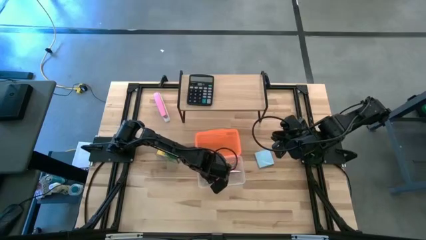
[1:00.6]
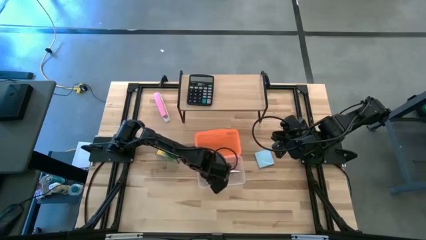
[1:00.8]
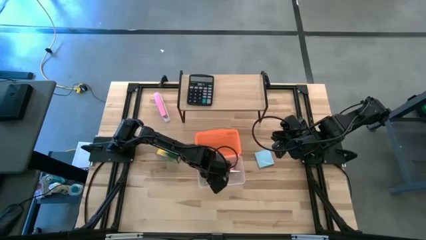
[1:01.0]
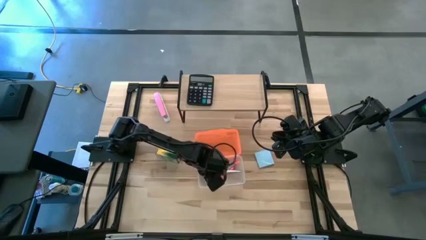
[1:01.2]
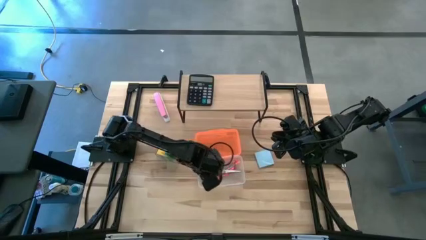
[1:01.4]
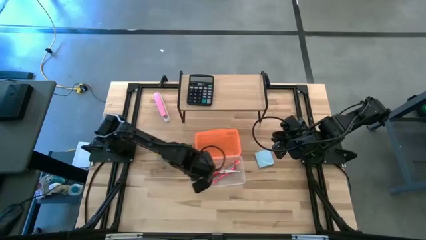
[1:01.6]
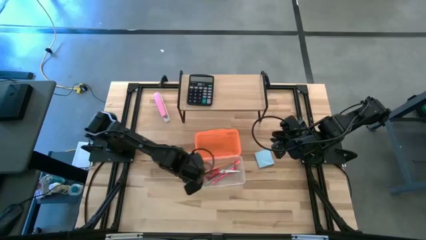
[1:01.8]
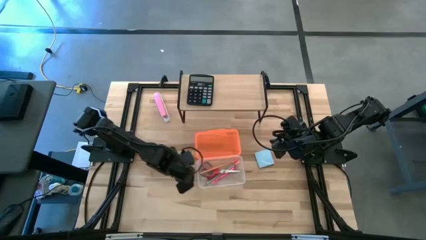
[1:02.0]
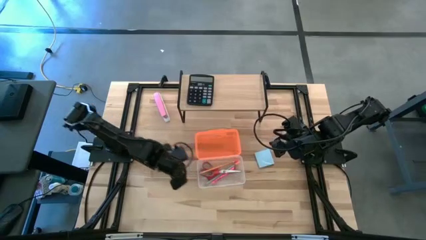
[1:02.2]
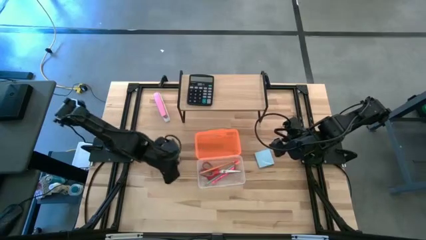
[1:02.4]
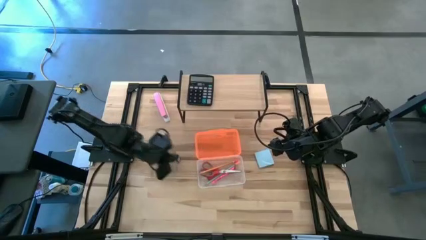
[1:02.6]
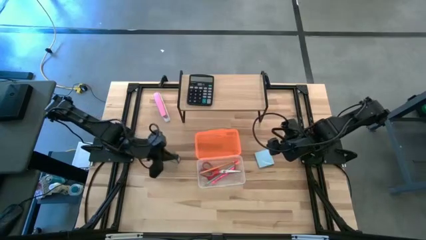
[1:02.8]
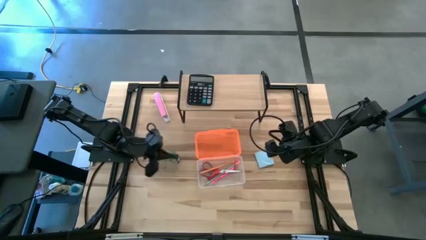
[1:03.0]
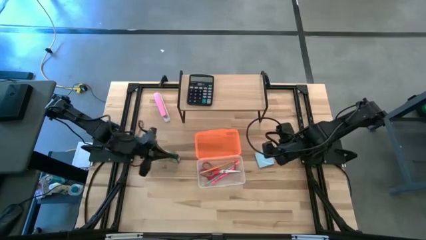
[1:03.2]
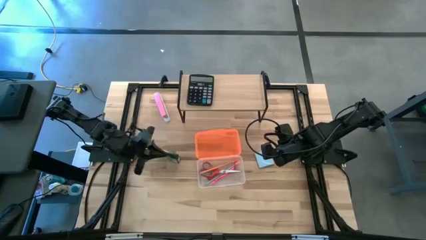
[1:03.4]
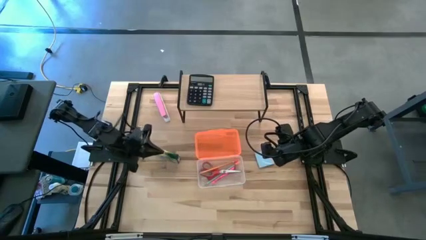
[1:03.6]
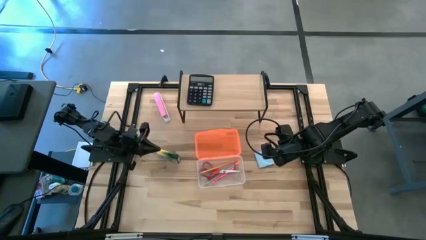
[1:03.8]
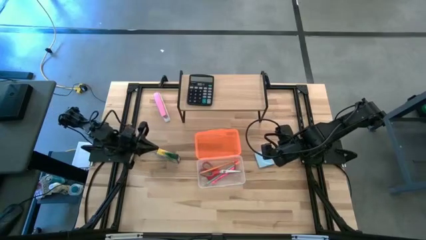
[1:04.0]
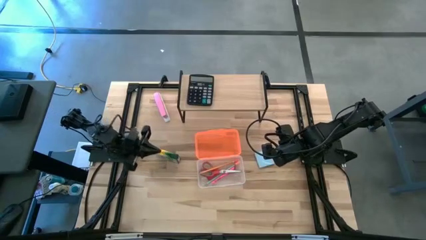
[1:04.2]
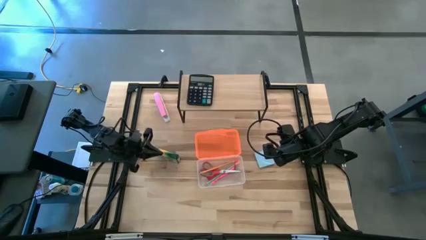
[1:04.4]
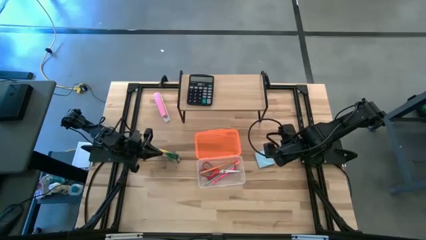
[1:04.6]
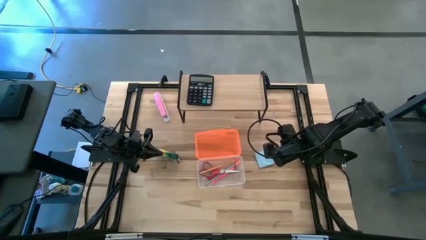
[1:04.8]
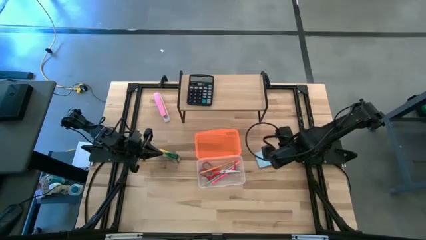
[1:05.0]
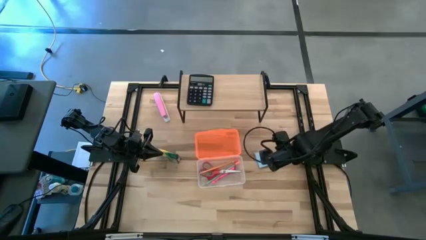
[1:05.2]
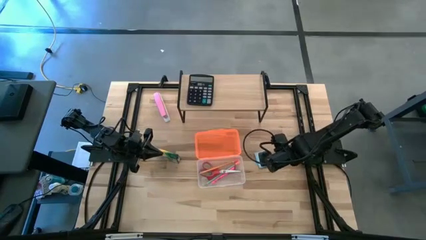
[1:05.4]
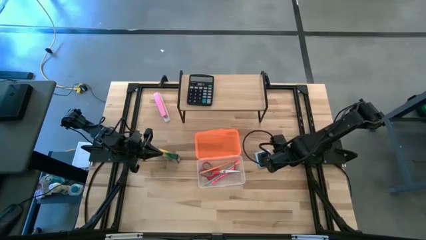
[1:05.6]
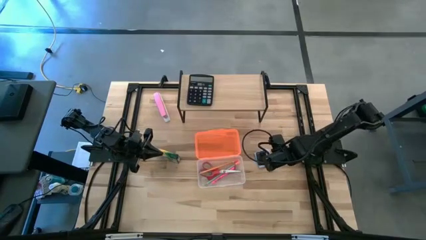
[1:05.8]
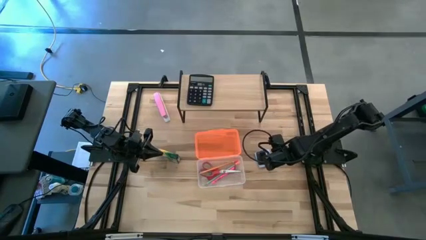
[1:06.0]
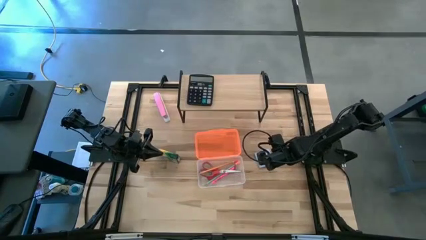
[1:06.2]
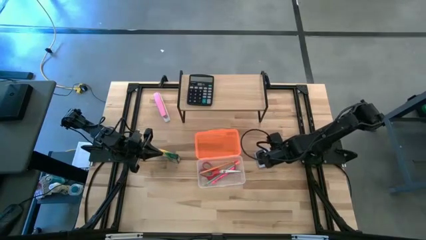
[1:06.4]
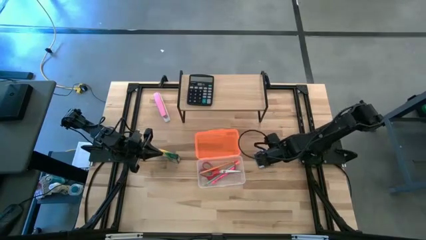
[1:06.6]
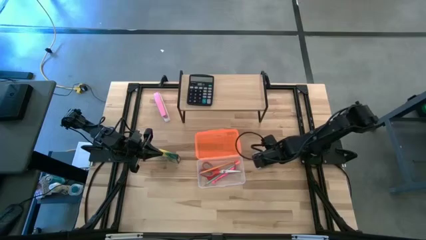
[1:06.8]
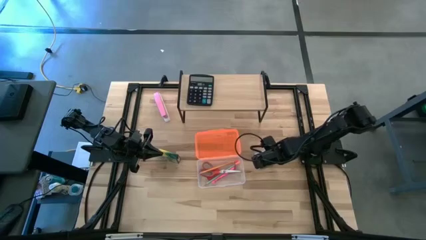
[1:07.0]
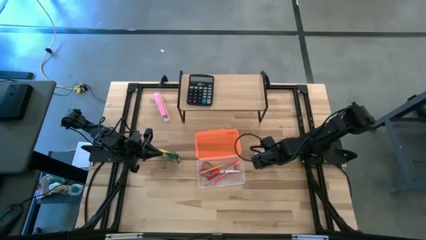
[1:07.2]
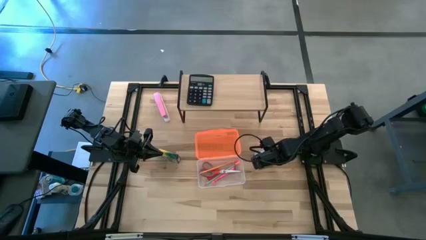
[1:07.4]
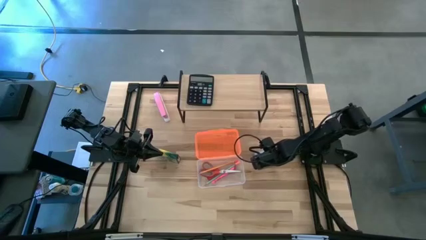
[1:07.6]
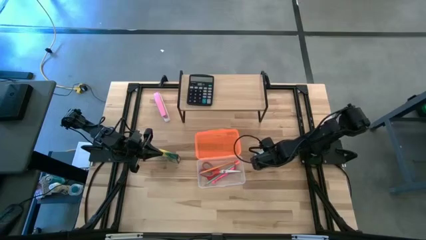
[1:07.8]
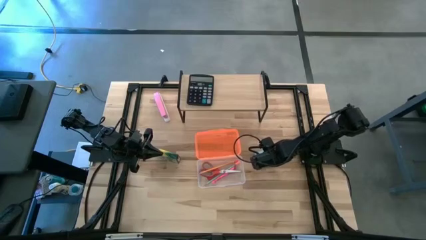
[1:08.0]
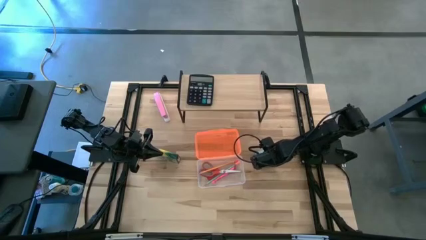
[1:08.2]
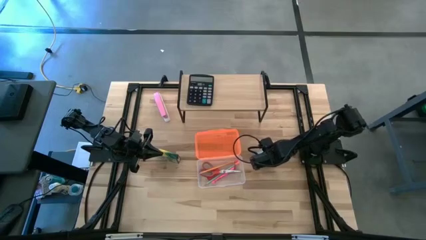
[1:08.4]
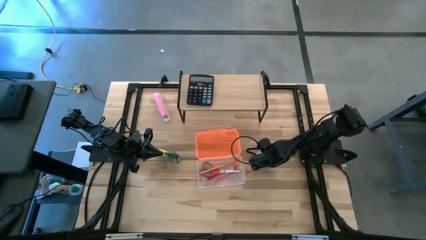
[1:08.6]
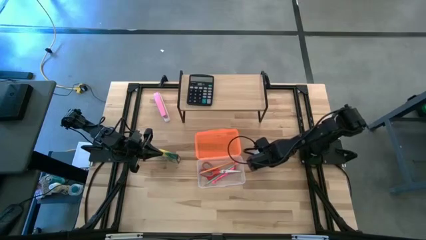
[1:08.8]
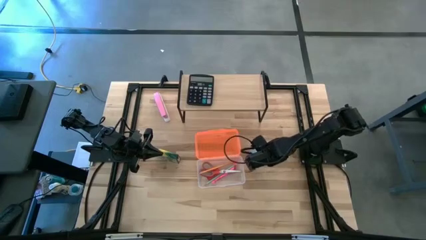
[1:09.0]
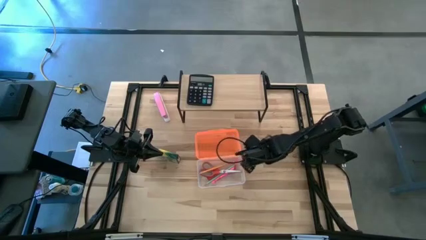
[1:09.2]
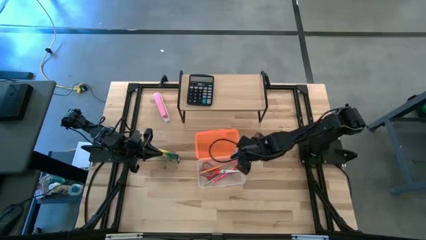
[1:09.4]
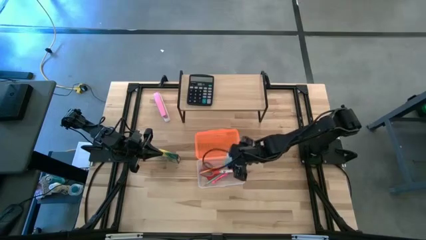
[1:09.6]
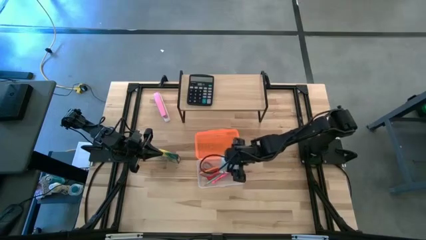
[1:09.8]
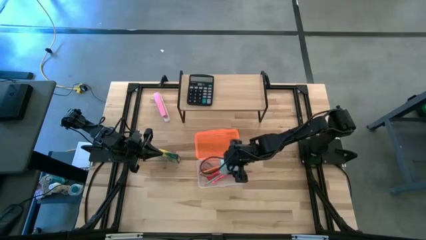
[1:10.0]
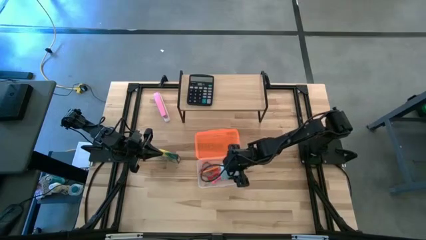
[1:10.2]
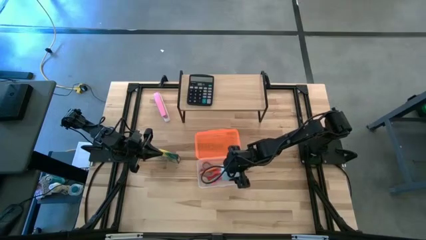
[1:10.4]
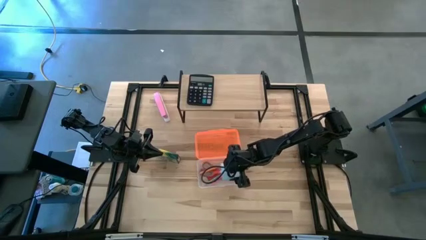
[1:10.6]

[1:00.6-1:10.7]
Task: Pack school essentials
Put the blue sticky notes into the orange supply box

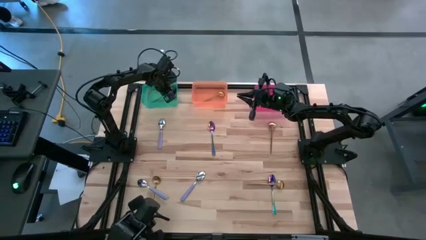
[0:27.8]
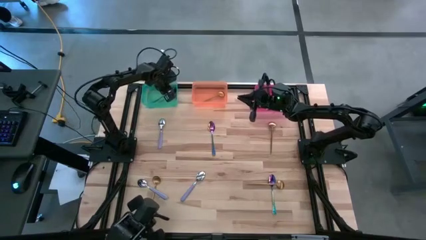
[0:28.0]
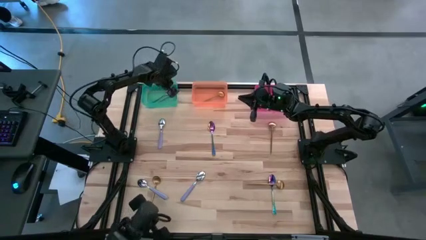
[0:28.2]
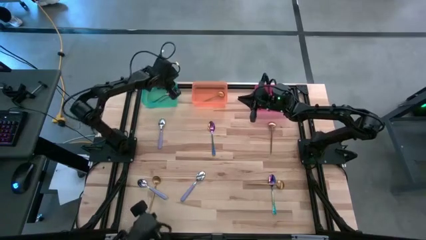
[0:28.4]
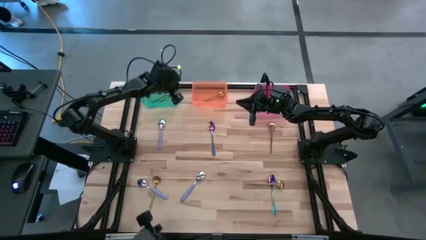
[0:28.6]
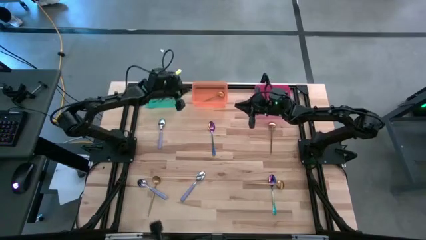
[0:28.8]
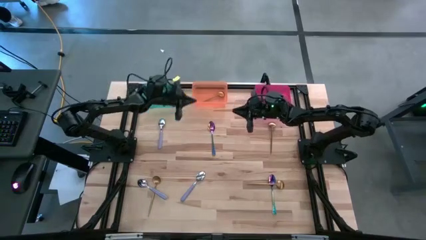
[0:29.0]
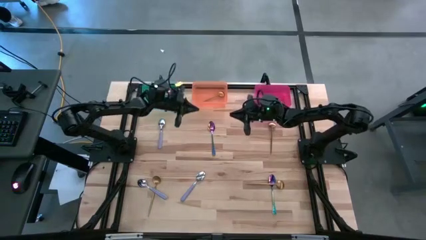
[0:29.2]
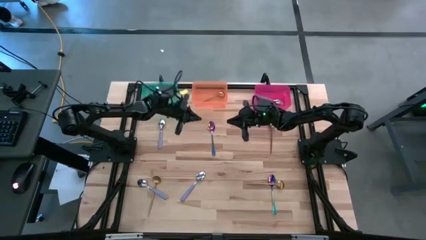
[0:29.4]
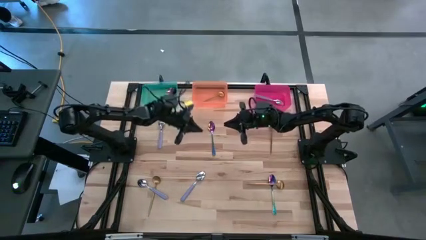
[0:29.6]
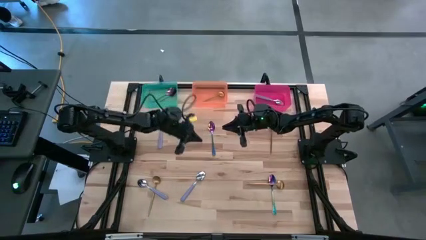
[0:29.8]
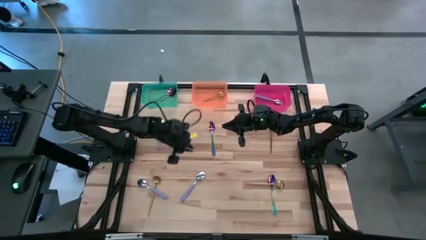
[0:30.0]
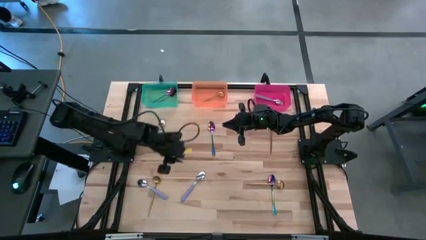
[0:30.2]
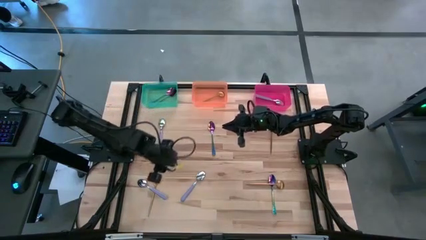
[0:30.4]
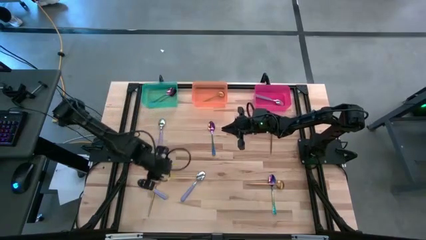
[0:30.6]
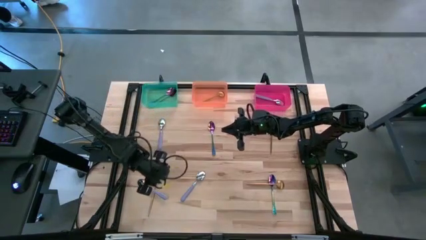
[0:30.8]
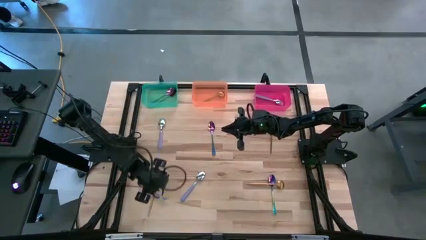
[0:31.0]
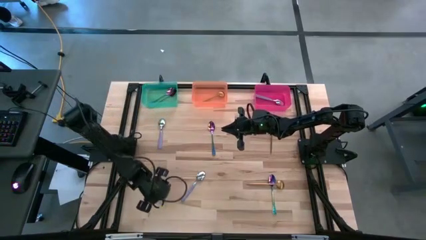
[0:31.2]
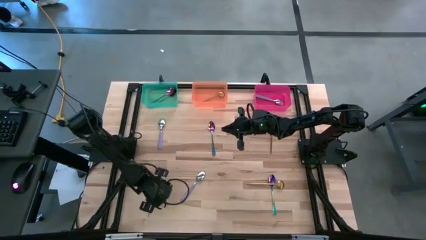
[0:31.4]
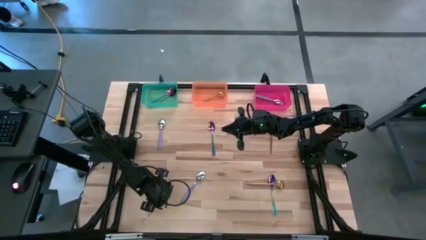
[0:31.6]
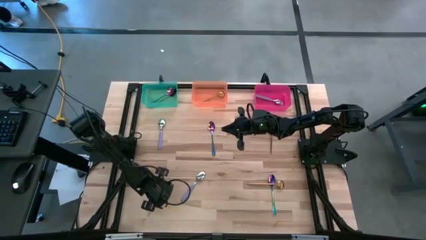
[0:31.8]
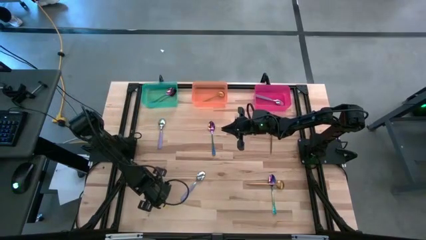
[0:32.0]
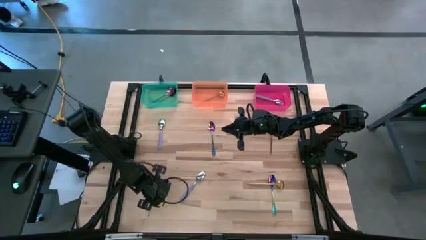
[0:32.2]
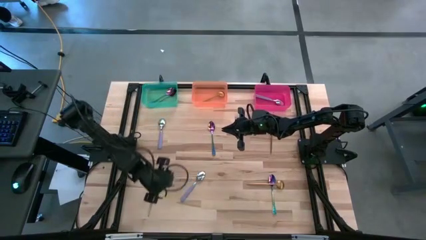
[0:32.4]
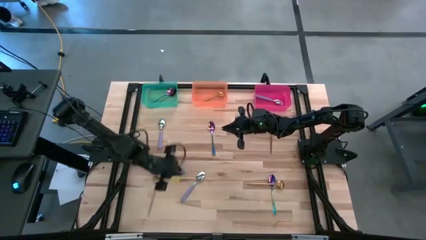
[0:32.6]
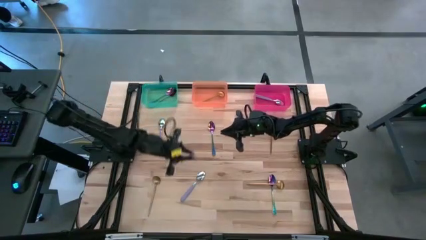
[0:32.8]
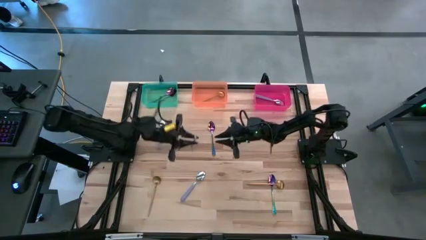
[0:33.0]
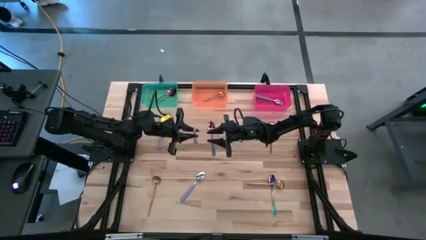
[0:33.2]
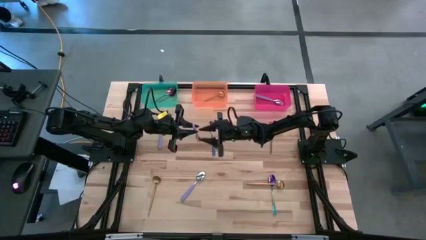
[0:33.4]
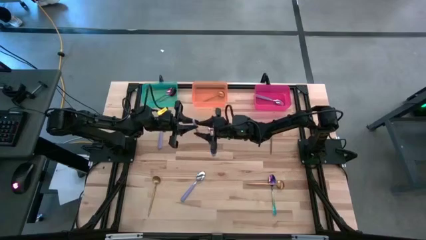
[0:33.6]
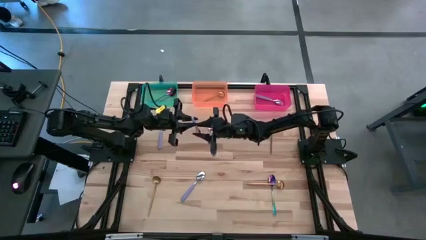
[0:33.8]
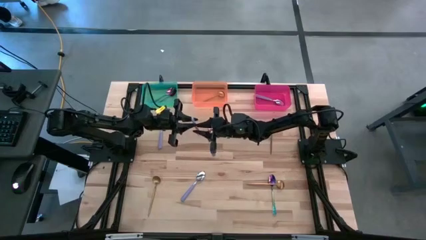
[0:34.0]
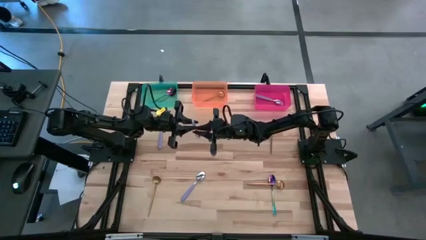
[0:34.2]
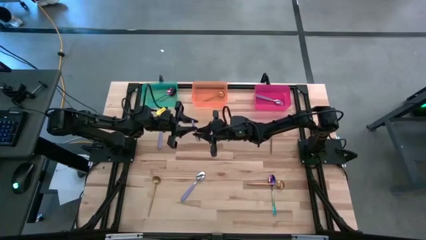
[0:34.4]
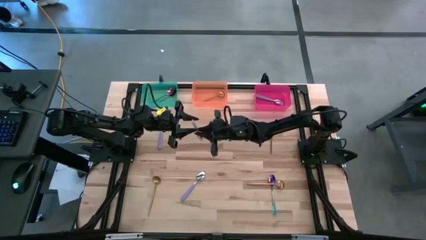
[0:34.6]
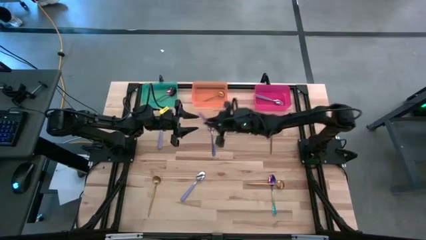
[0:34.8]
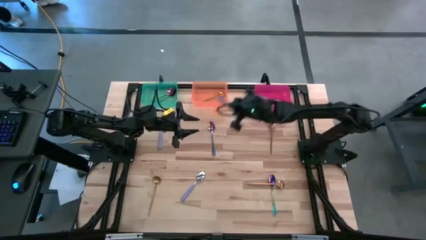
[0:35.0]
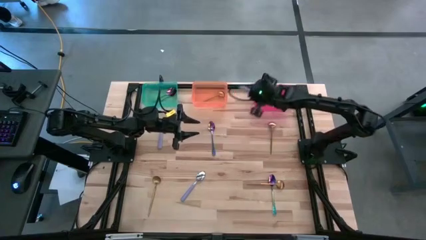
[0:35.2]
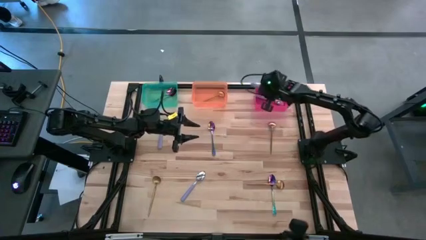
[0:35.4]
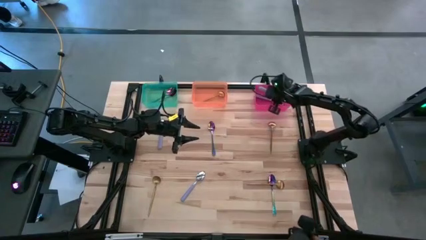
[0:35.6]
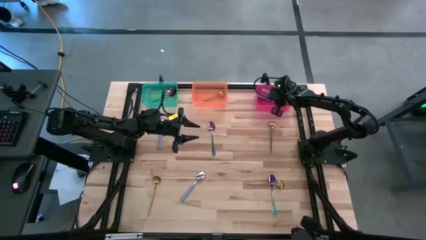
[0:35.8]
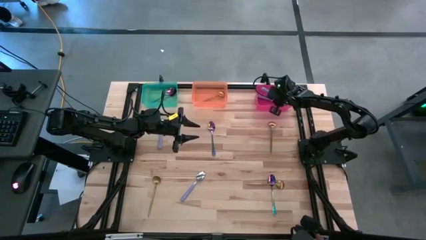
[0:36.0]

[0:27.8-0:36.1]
Task: Sort silverware by color (type)
Put the purple spoon into the red bin
